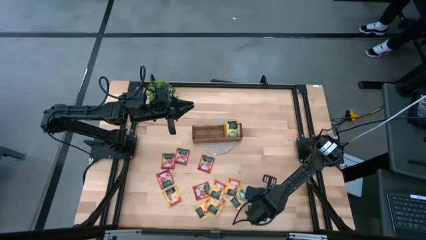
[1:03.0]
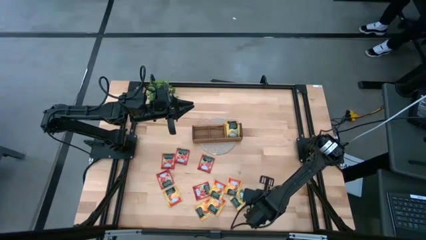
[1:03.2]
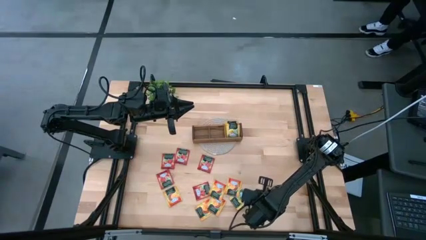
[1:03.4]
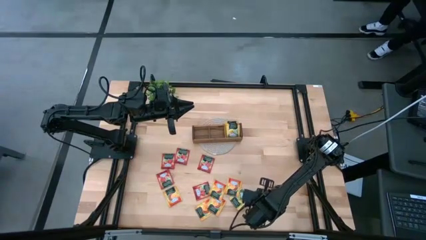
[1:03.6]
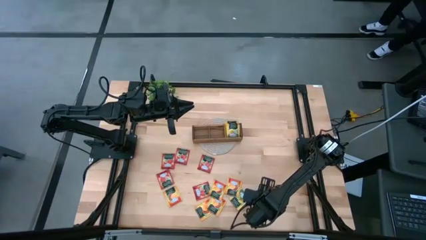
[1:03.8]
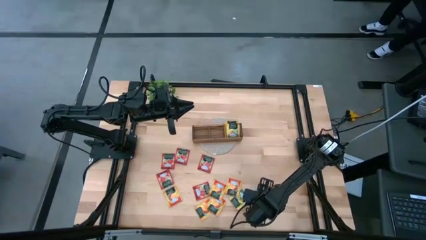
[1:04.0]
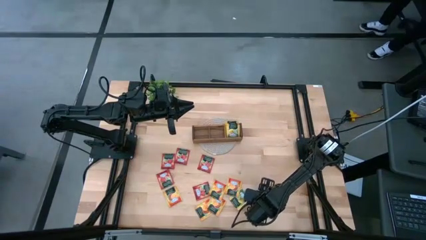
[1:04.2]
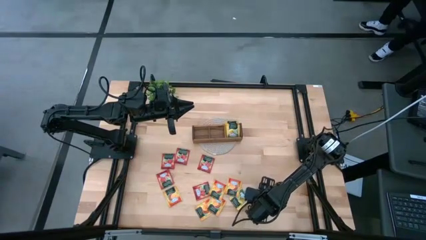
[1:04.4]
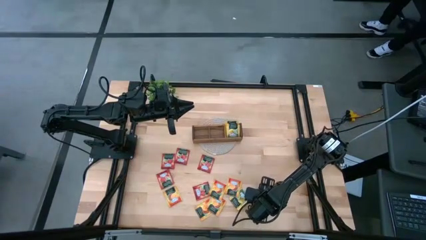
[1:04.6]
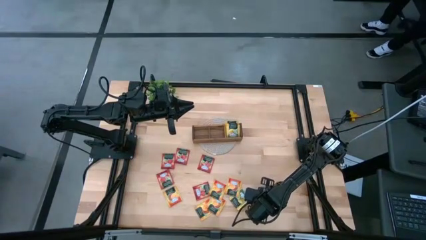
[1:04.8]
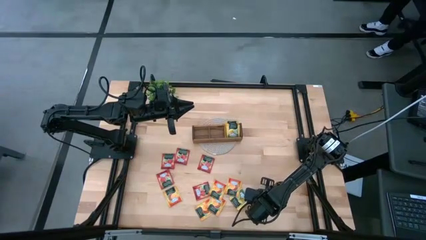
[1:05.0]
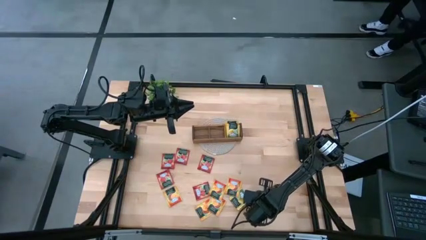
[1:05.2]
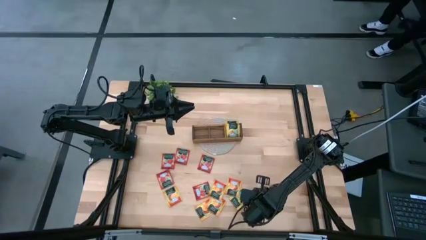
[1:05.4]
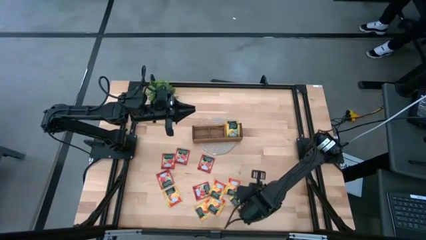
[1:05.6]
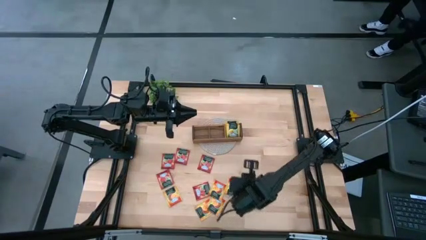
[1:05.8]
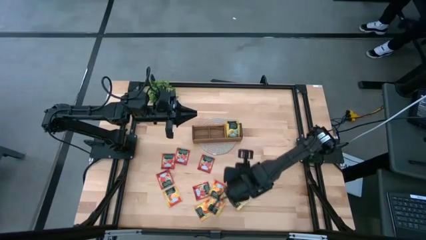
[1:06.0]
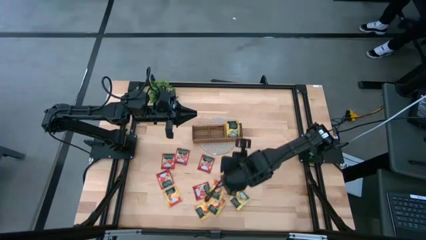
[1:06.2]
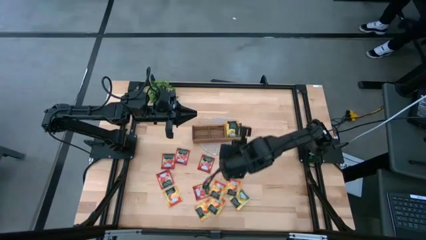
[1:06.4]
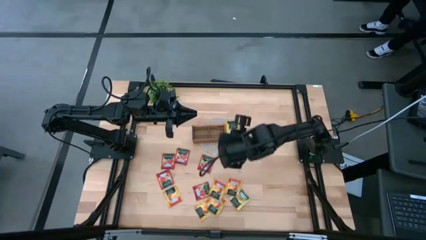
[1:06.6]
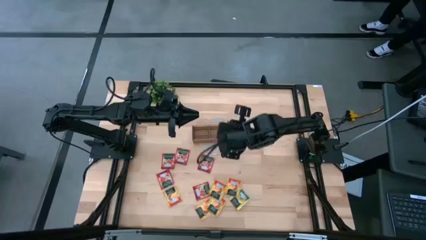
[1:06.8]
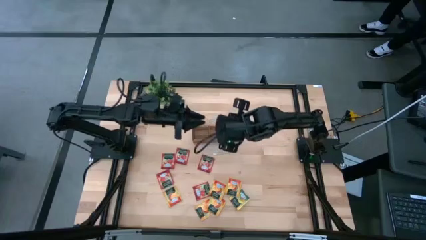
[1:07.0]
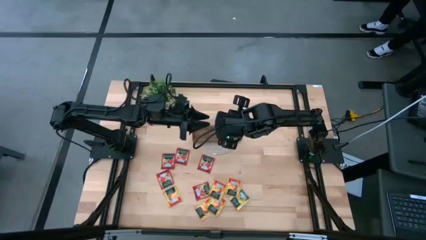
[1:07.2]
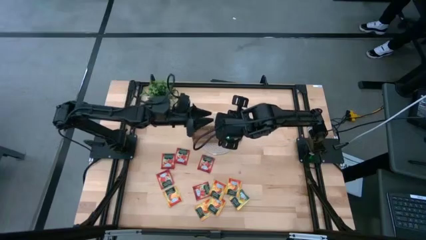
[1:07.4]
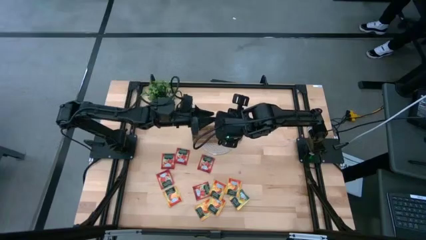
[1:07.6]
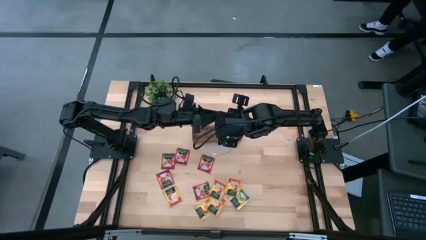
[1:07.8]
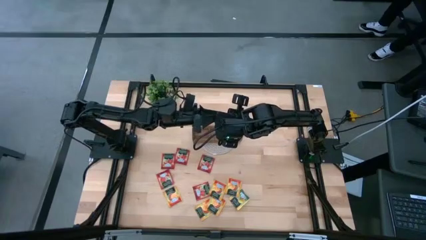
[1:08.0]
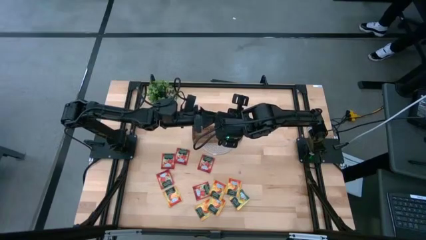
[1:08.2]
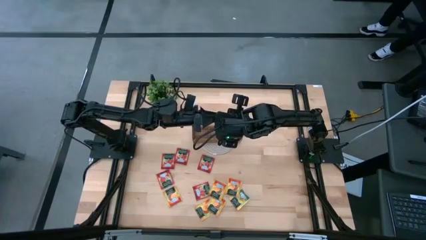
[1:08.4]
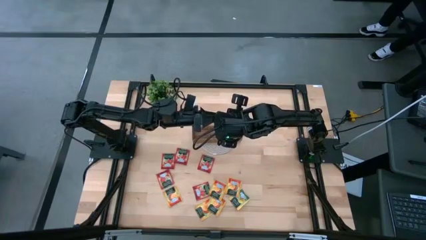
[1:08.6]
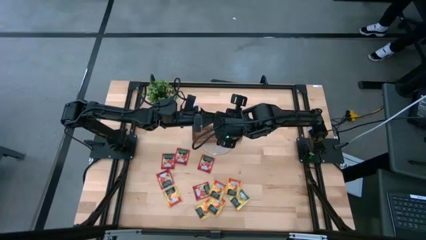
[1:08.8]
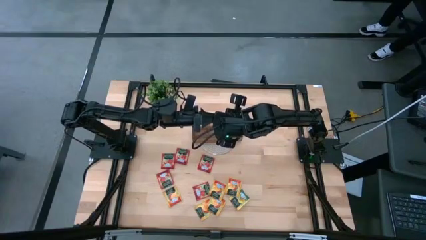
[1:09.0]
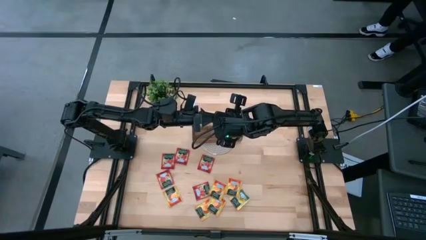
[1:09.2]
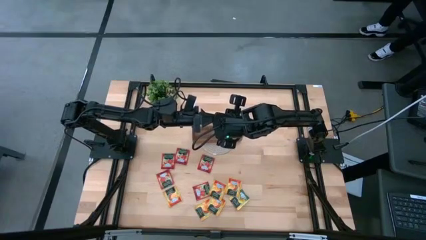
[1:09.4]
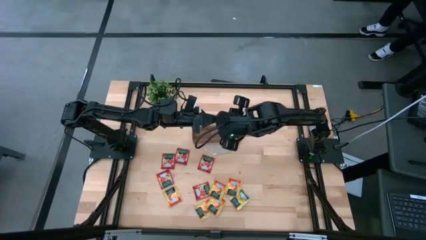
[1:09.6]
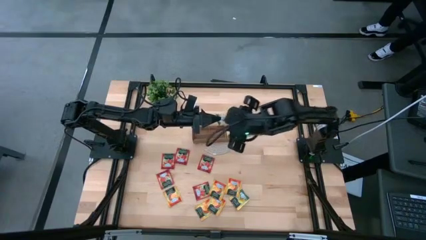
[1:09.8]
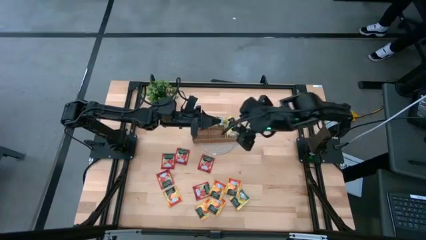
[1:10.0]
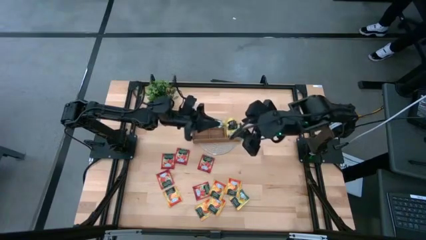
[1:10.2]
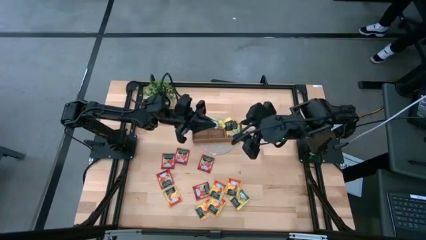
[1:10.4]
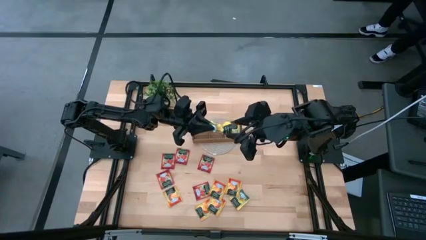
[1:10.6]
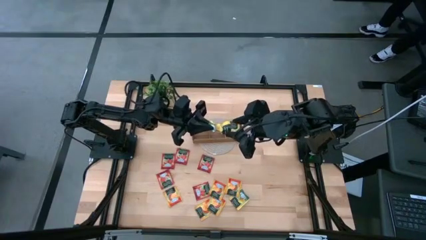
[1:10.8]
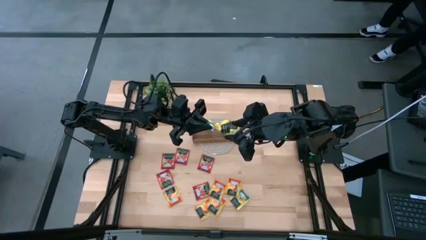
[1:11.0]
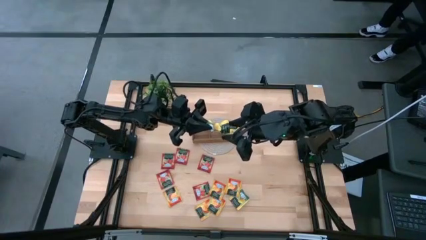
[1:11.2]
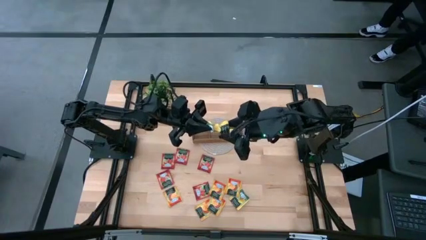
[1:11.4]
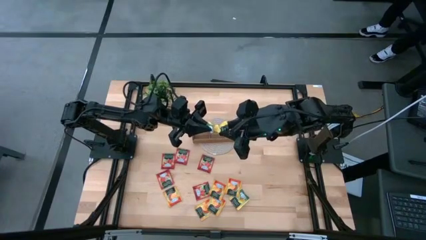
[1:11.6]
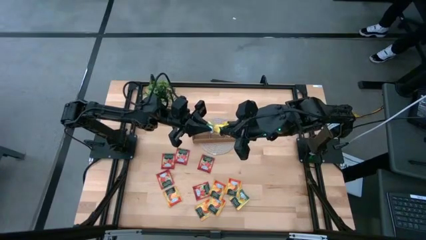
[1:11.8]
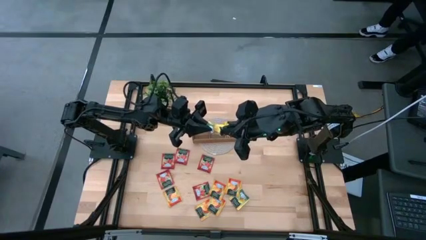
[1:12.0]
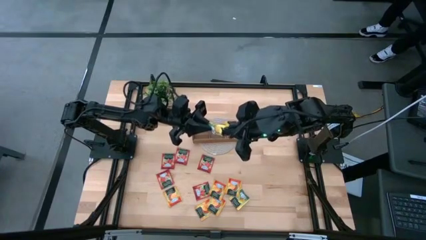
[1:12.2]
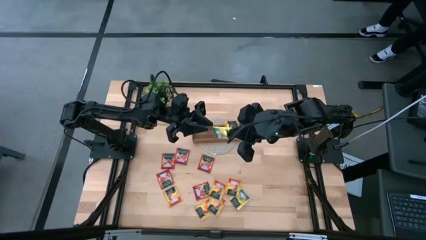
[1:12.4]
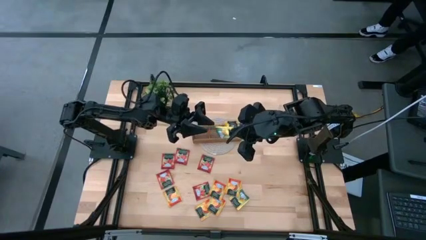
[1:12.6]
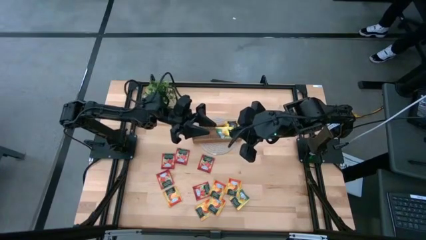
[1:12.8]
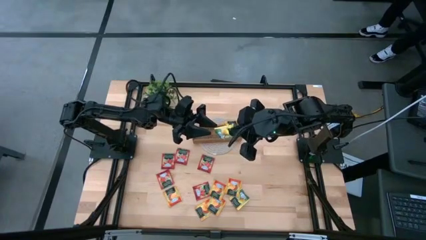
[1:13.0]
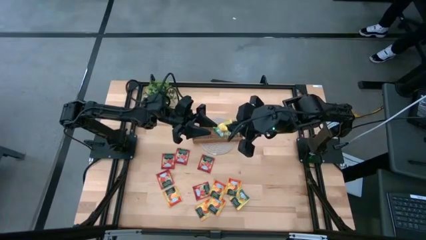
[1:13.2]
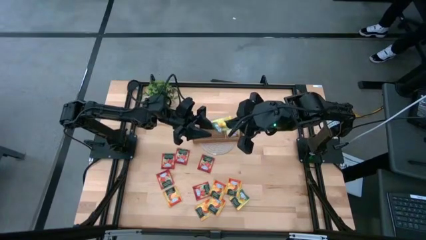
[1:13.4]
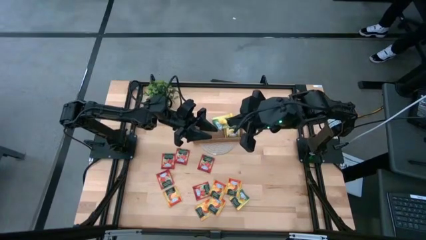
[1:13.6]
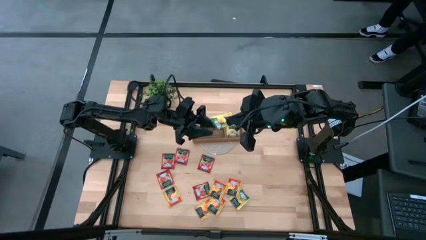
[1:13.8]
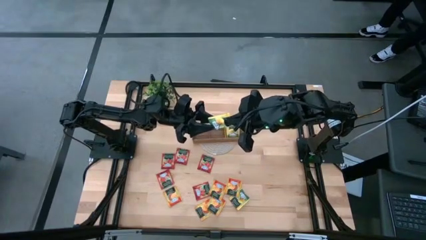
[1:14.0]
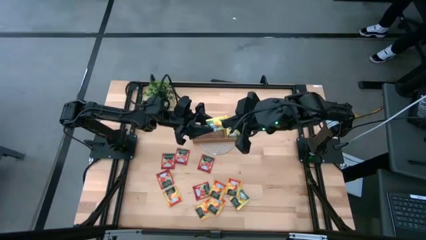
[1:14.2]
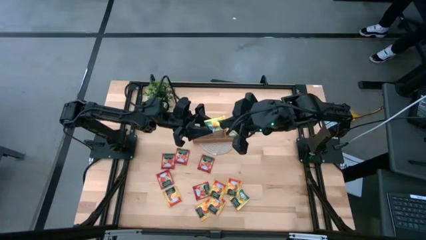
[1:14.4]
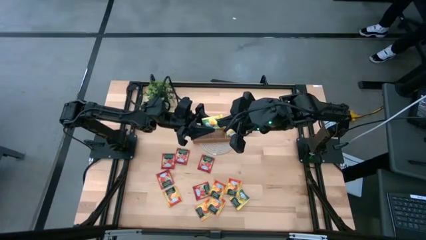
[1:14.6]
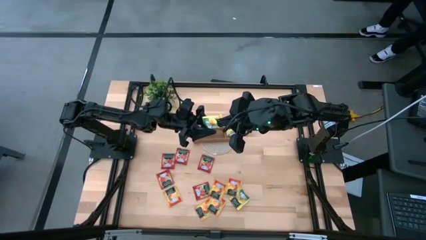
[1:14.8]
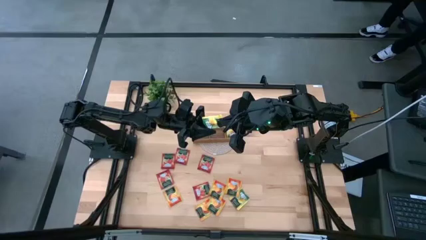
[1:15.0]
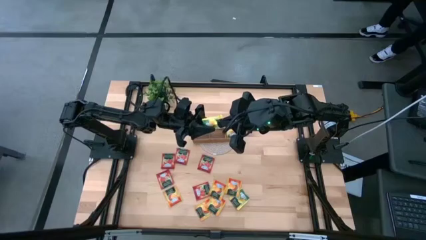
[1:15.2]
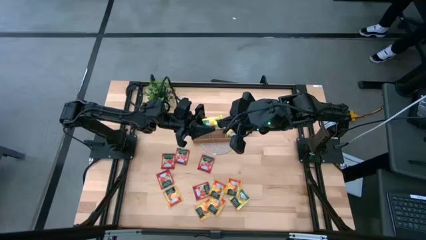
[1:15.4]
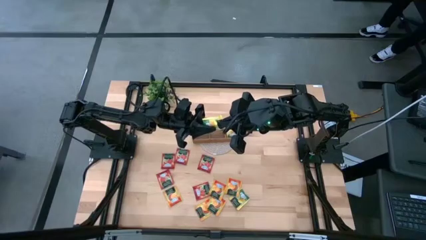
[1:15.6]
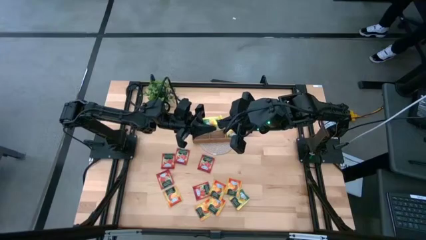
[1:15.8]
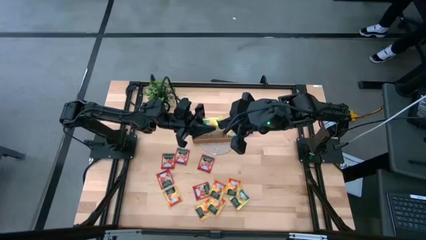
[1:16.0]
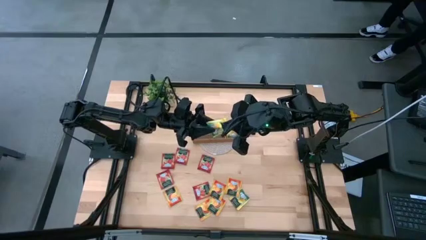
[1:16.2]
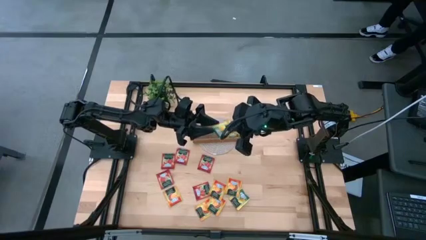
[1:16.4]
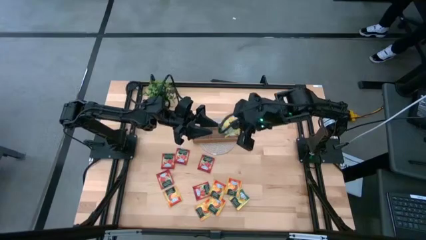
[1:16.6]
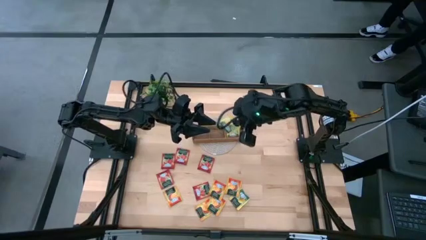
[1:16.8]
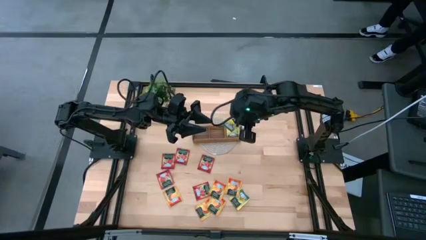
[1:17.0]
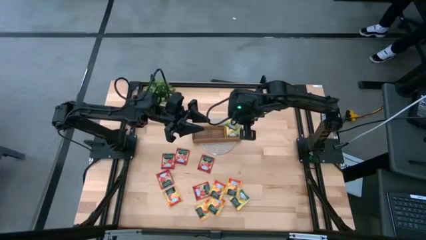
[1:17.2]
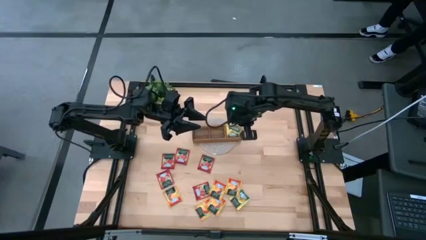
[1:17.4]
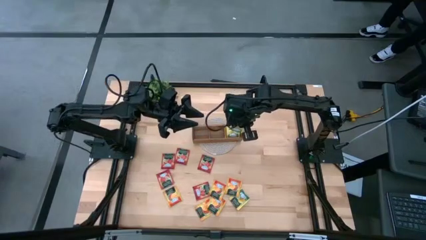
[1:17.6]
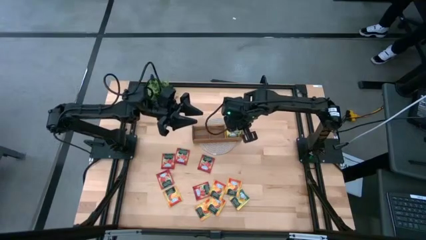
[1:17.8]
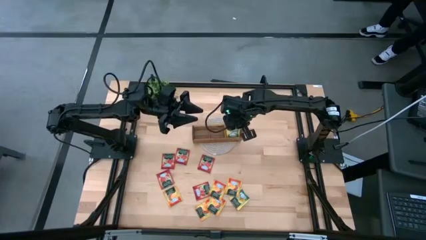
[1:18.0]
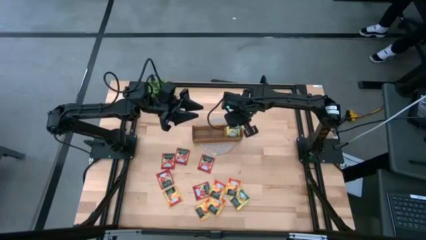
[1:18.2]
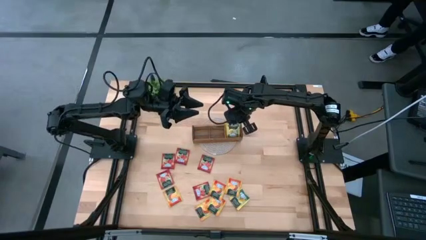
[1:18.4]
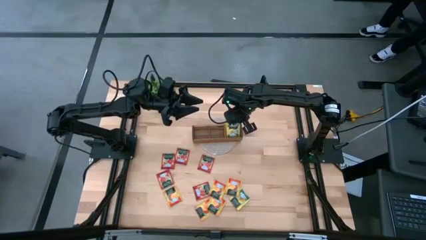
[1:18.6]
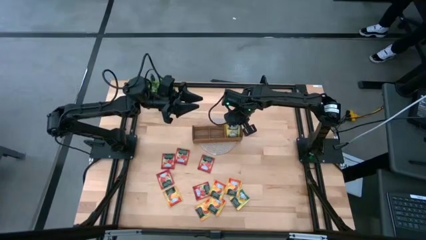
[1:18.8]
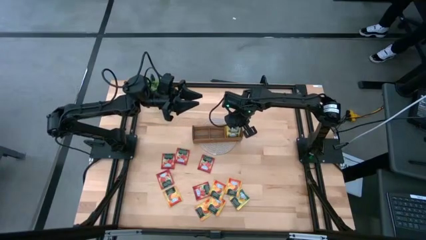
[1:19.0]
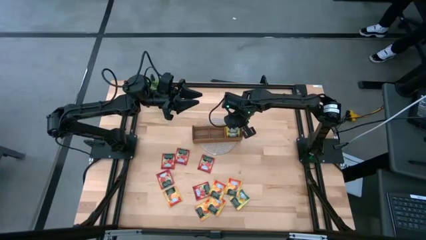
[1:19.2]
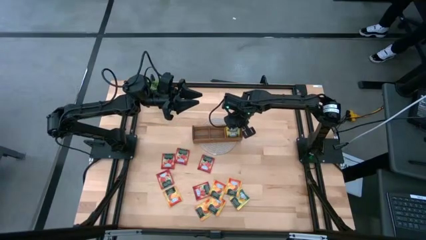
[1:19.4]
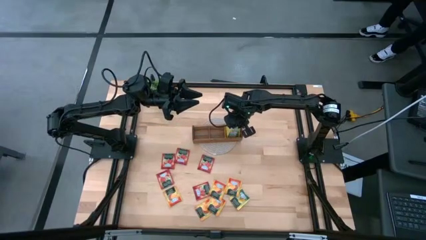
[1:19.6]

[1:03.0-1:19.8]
Task: Pick & Place Tea
Put the yellow tea bag into the right section of the wooden organizer
